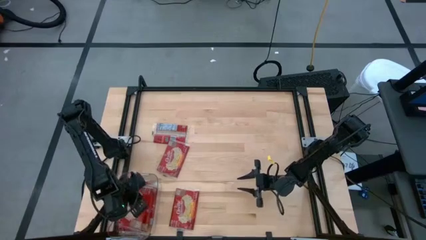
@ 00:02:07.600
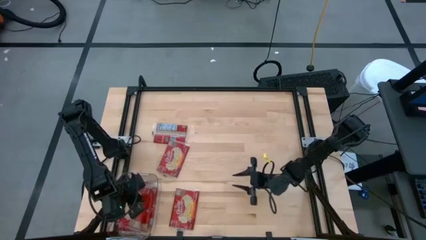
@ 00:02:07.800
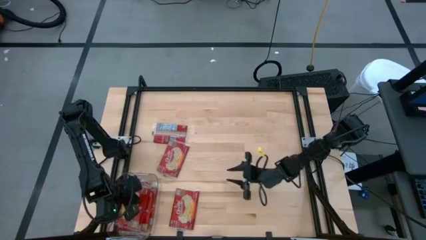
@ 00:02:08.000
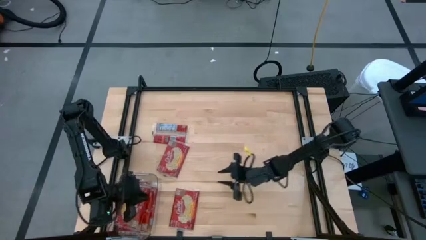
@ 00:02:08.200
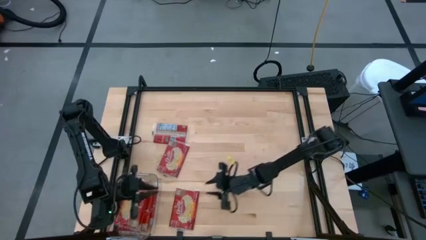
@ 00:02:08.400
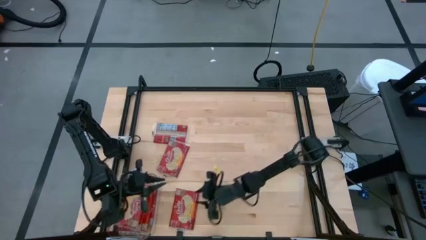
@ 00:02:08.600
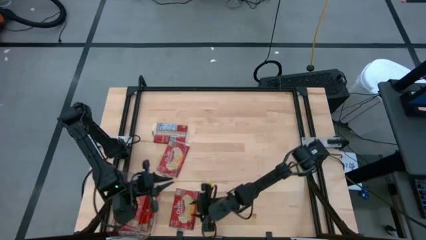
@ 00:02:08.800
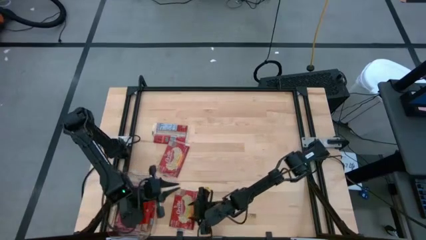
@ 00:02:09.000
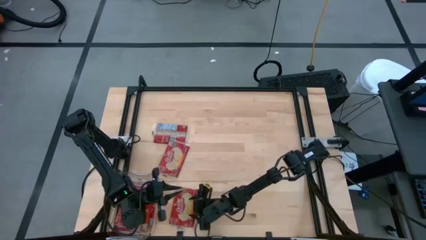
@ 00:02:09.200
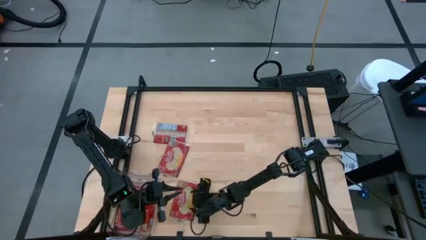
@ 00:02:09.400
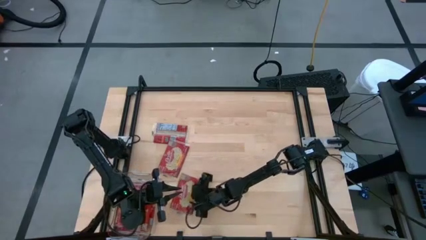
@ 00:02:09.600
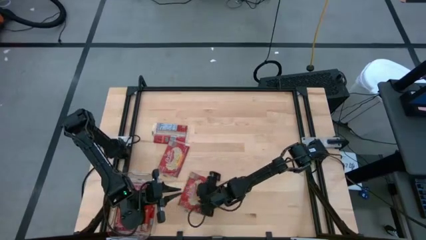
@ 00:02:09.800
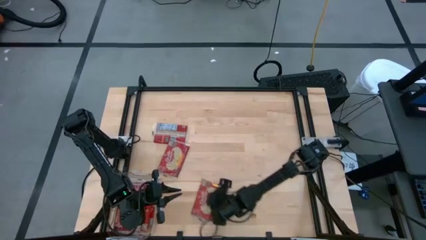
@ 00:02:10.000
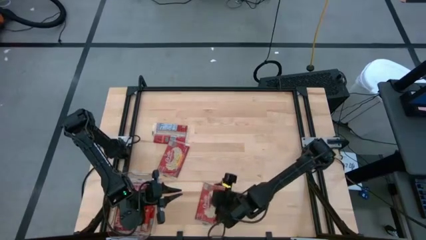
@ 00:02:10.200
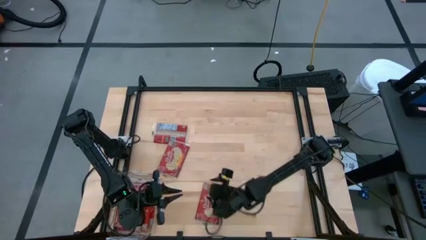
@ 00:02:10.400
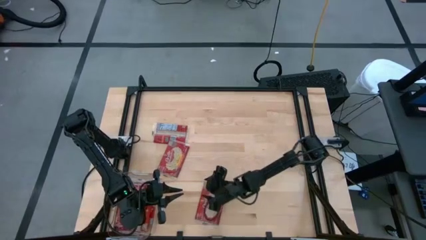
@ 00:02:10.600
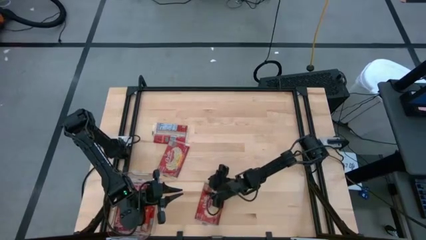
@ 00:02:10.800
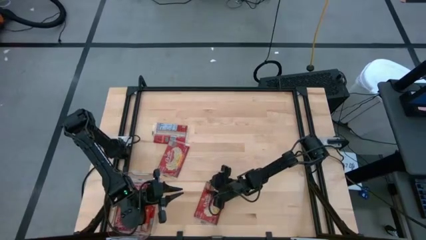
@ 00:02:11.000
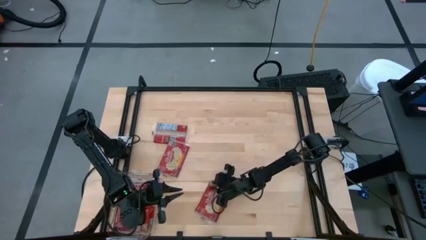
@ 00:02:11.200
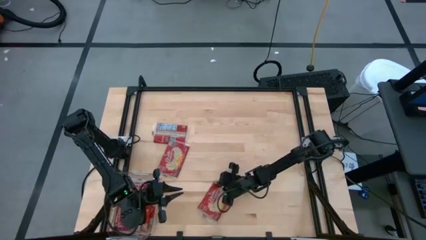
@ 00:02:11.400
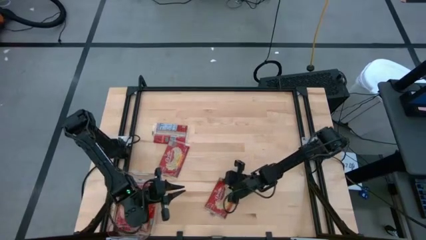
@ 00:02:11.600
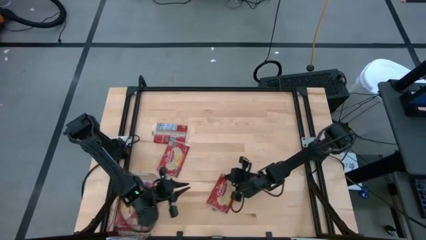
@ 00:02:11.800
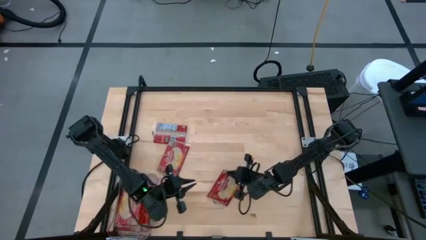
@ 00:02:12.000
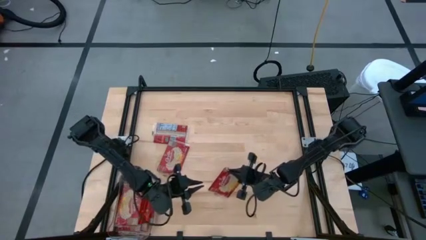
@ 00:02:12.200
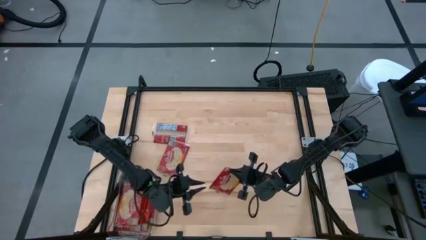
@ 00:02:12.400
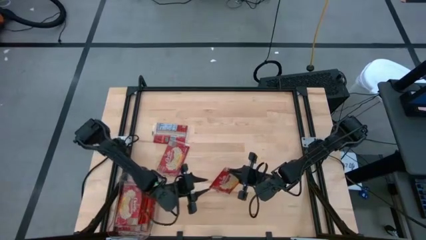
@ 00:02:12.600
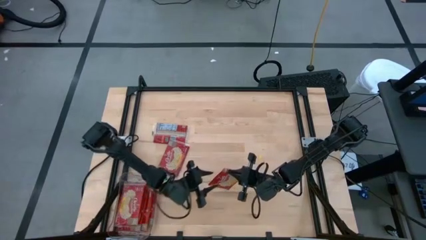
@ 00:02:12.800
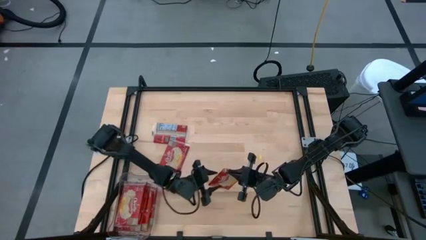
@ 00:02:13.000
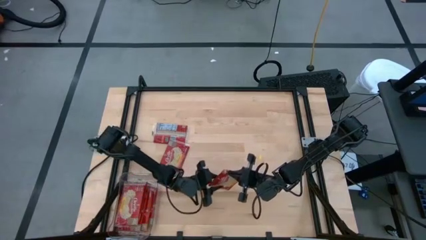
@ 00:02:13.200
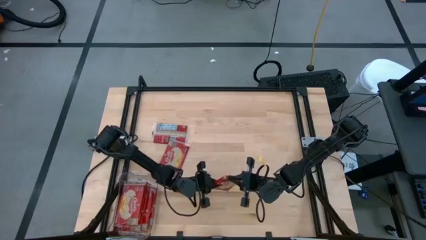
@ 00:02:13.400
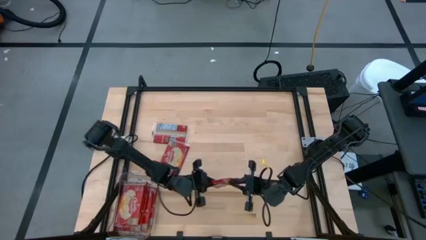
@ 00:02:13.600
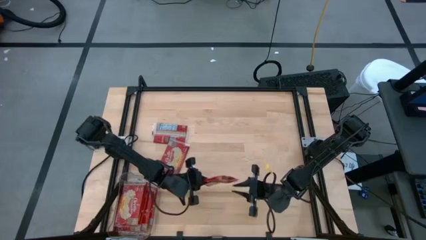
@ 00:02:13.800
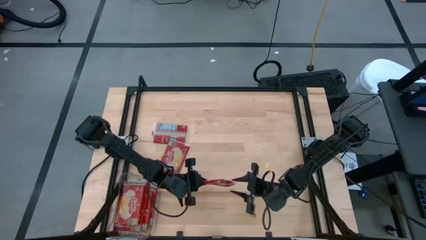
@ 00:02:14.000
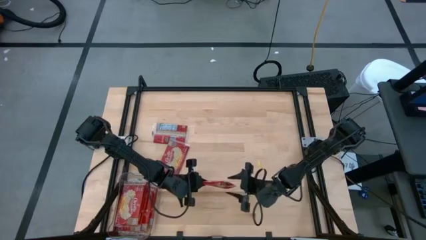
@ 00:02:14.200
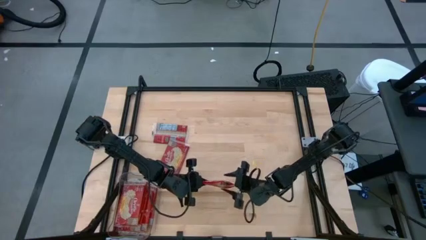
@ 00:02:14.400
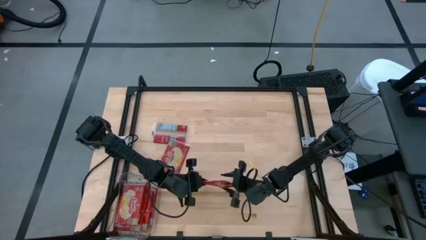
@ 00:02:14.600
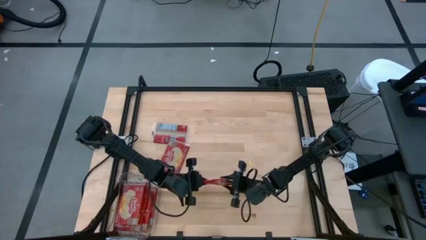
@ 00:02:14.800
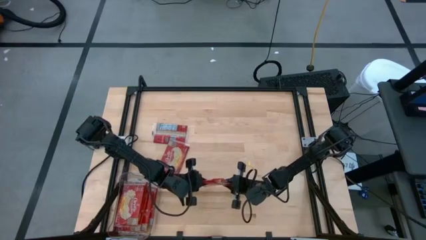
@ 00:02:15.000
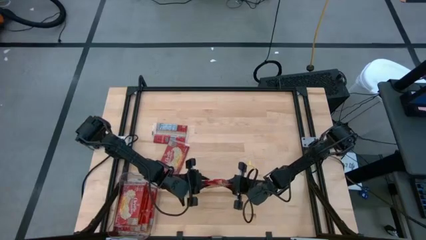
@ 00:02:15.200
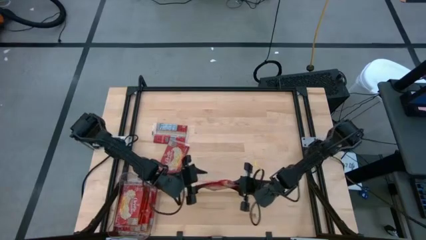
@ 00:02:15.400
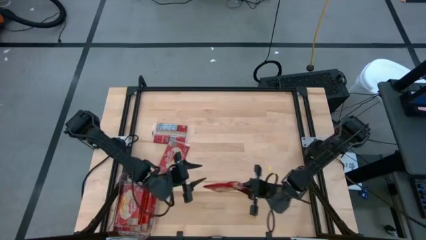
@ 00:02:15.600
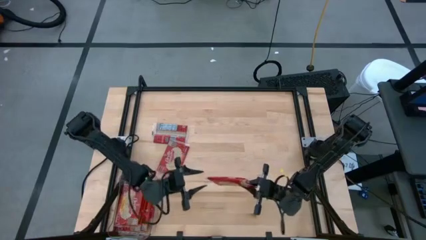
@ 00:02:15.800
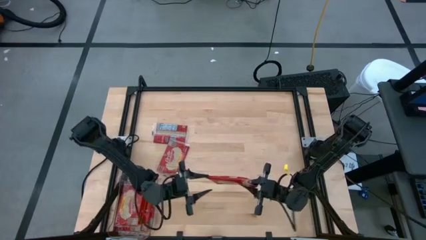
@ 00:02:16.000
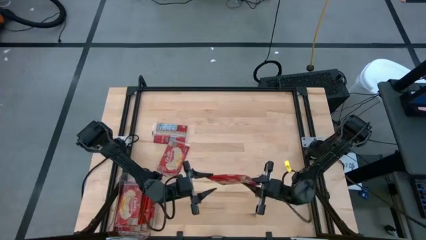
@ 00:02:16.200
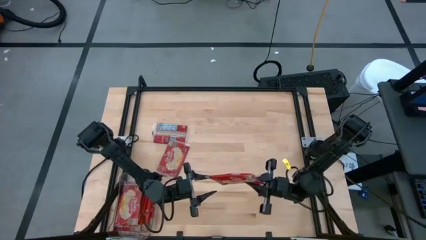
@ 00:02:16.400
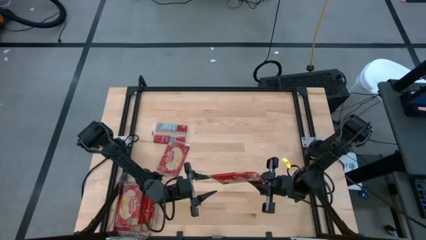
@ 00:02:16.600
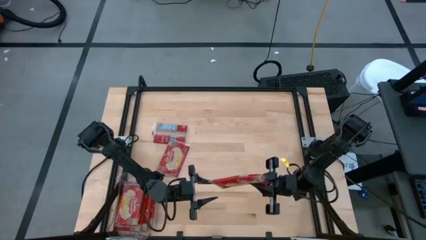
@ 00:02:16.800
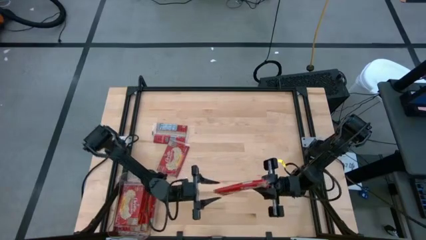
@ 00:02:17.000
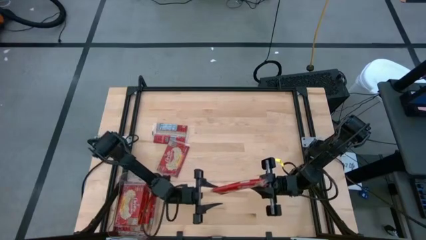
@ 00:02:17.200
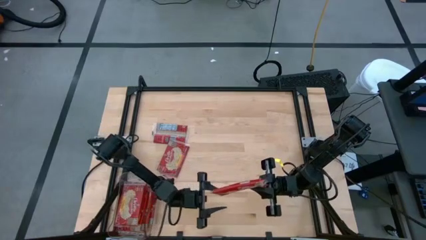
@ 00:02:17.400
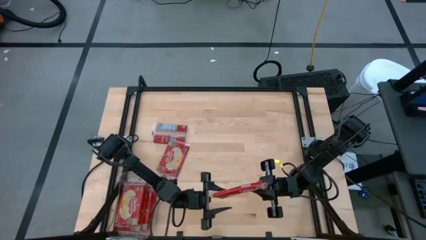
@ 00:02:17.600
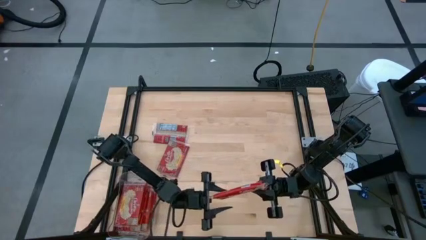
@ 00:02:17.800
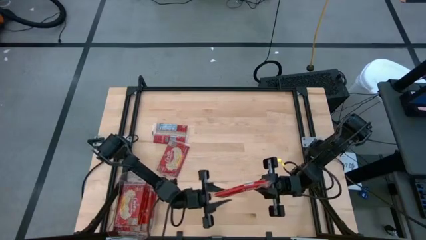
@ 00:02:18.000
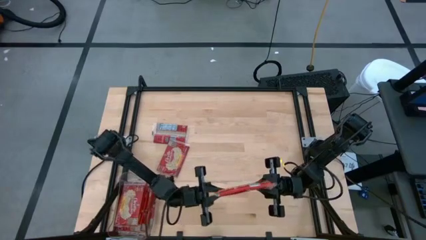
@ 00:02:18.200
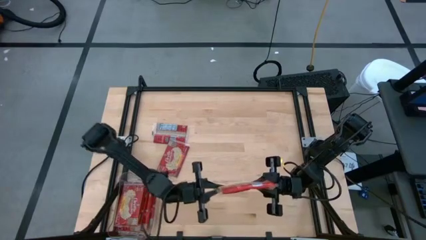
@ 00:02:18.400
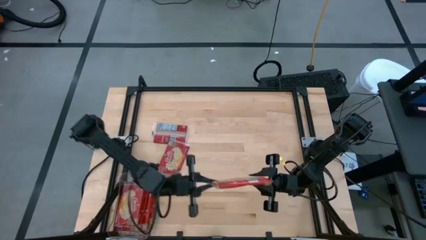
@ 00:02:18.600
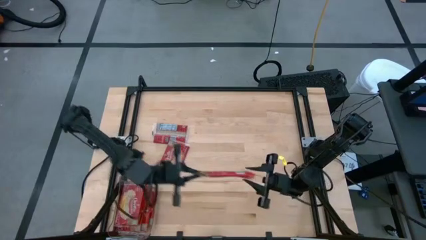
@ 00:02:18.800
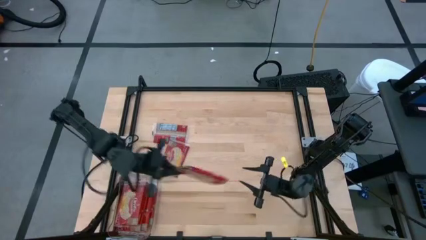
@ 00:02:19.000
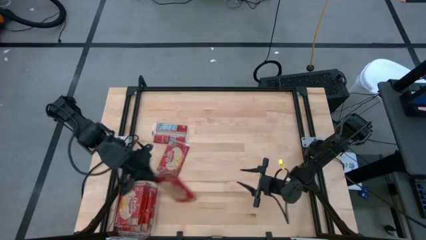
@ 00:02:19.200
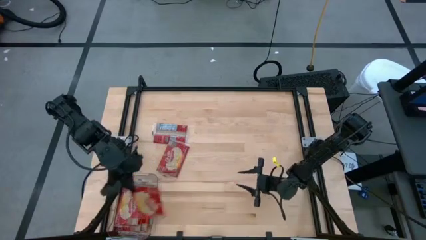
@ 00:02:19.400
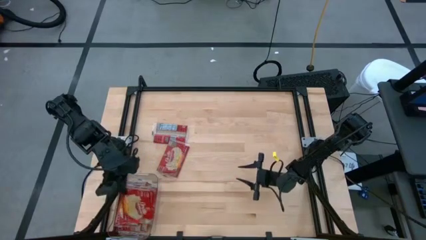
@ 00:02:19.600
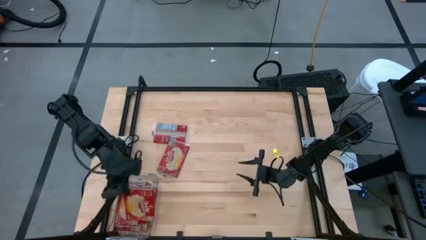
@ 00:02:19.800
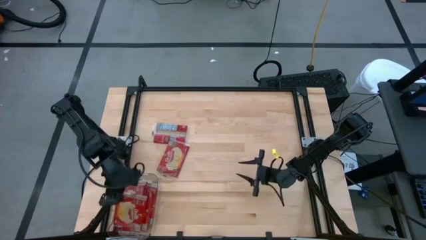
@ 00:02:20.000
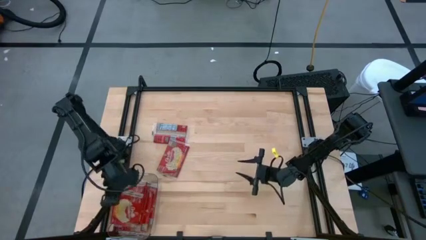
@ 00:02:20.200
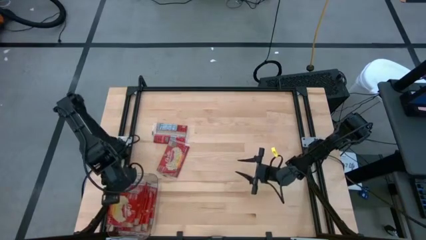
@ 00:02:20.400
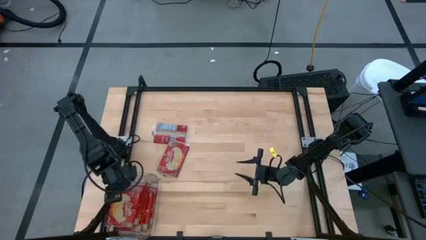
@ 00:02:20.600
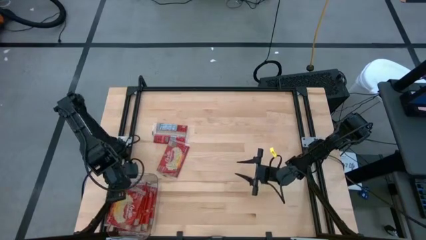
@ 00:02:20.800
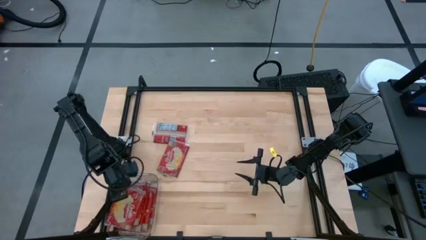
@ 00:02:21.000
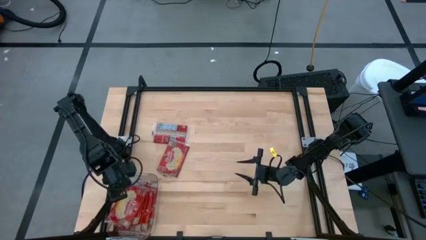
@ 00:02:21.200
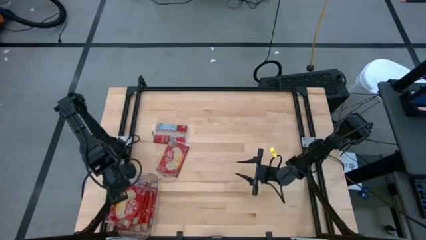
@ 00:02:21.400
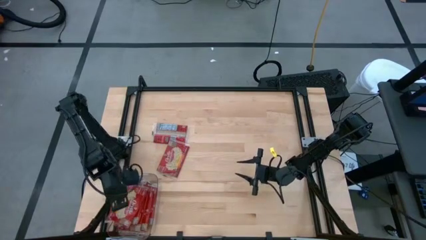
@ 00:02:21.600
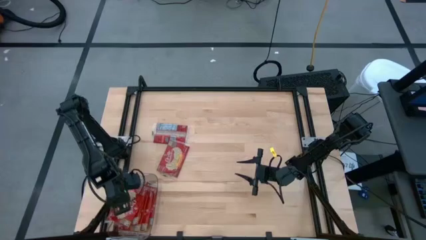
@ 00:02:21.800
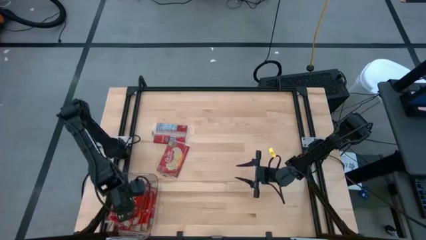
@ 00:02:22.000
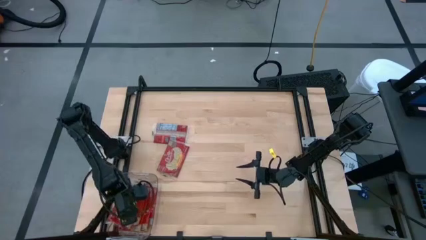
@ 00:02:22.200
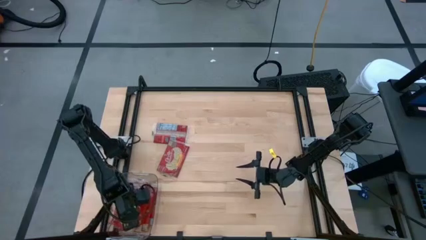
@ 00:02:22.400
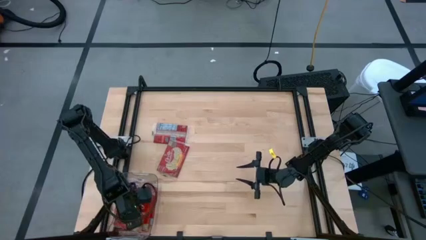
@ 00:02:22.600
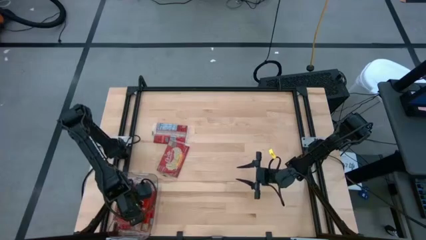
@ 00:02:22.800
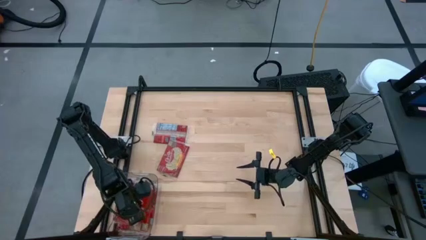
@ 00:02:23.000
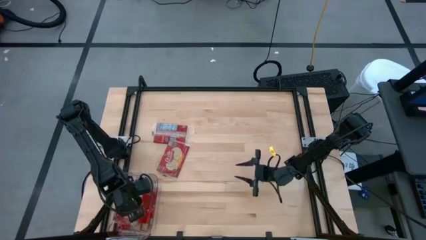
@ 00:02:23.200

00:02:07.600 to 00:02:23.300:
Task: Sort popcorn bags into baskets
Put the popcorn bag into the transparent bin
